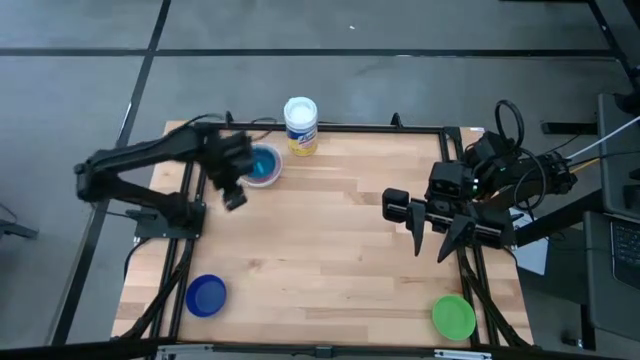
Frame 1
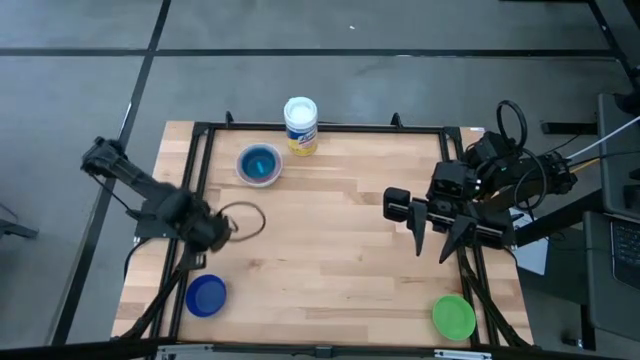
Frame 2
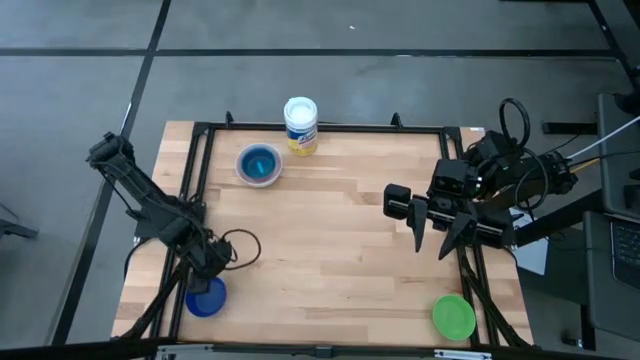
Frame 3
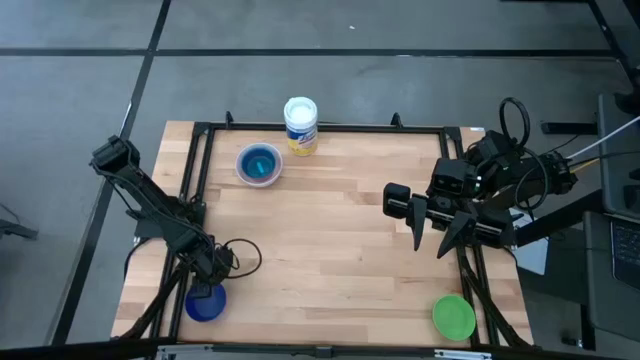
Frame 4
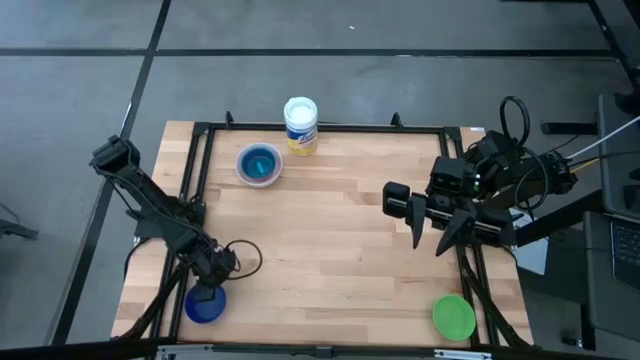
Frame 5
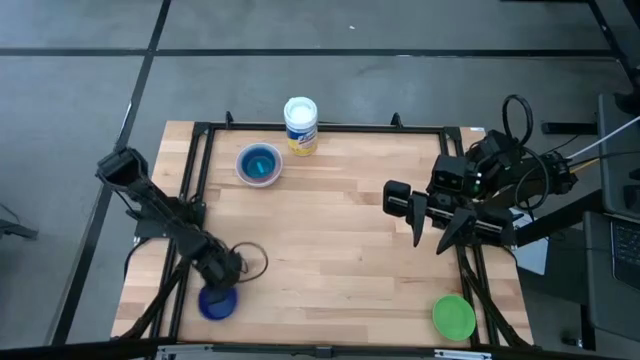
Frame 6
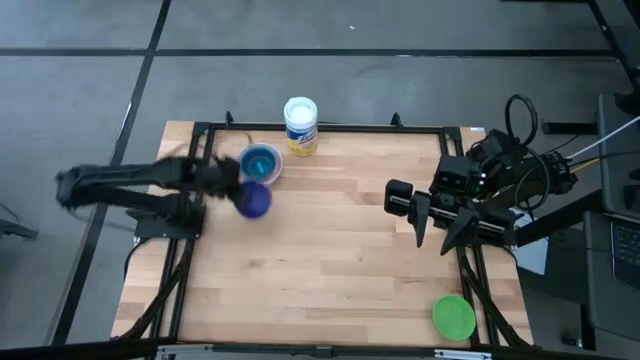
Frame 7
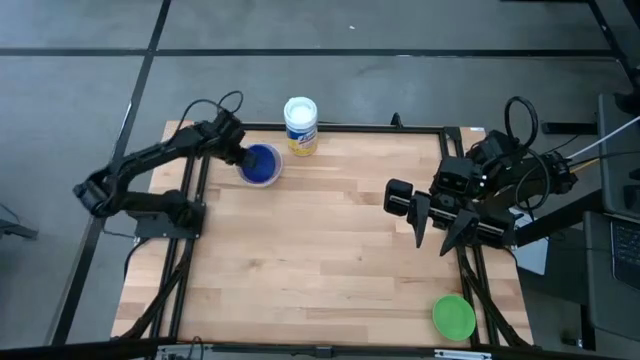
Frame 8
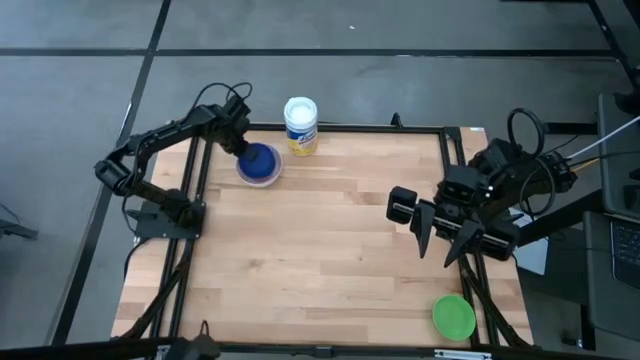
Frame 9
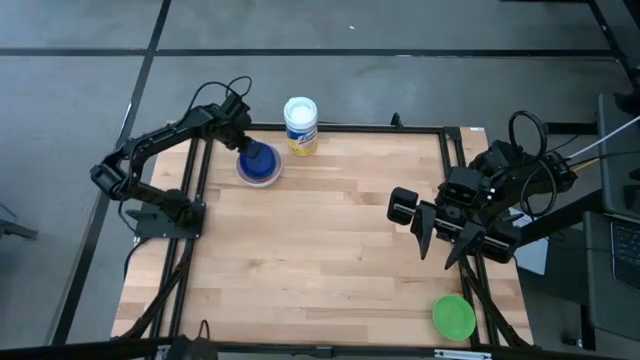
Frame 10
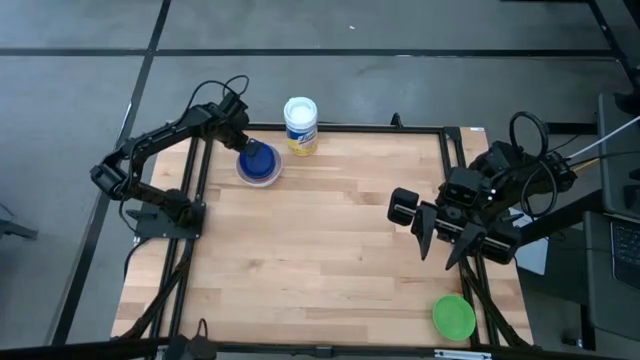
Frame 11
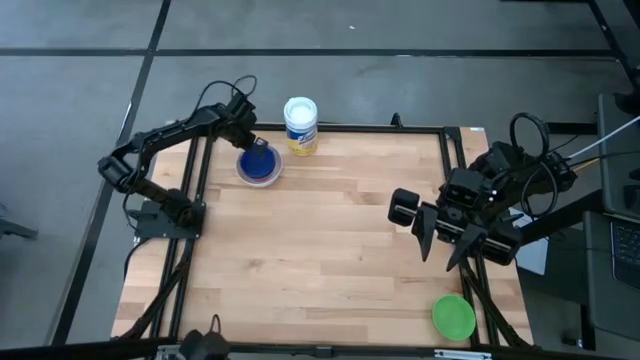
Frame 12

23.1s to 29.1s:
Stack the blue bowl on top of the light blue bowl

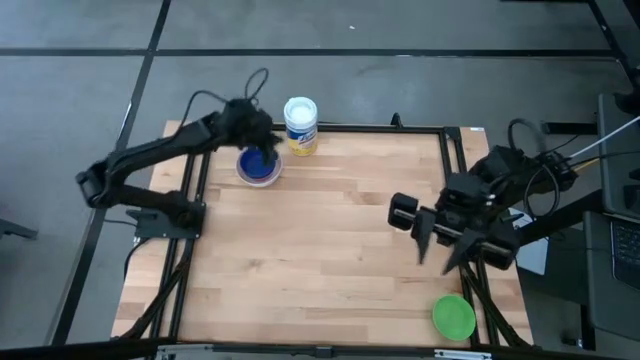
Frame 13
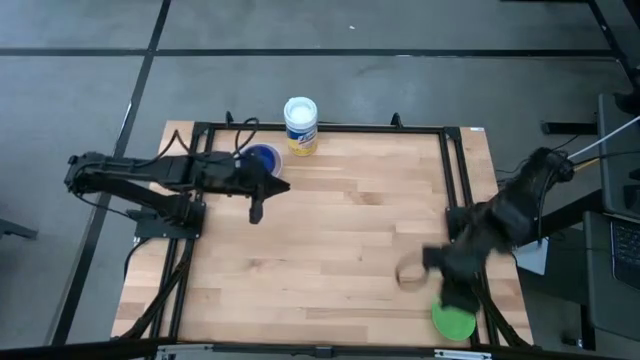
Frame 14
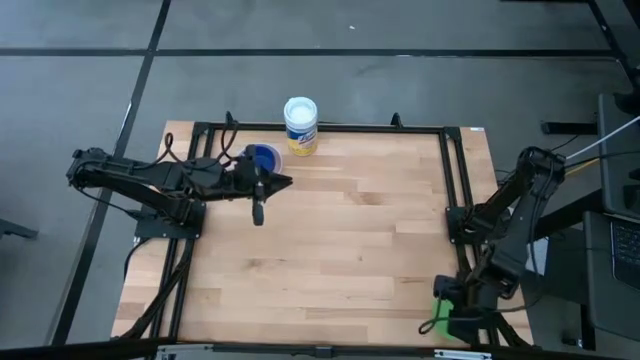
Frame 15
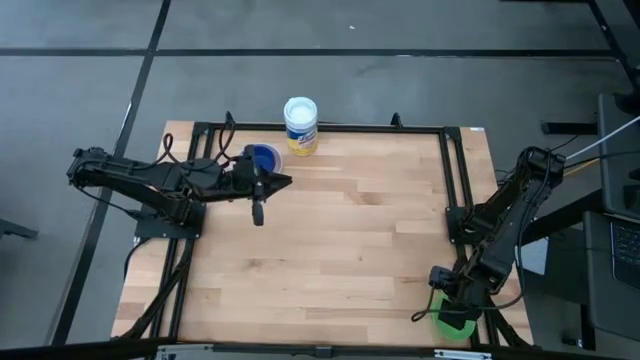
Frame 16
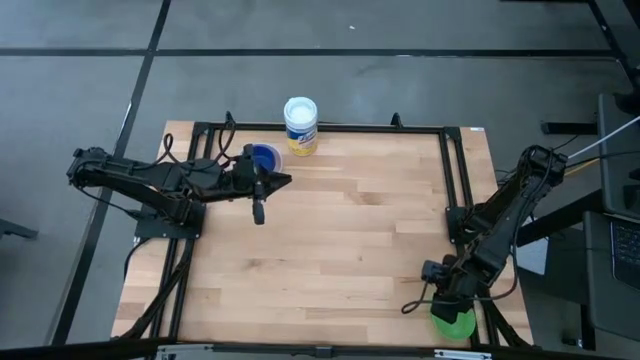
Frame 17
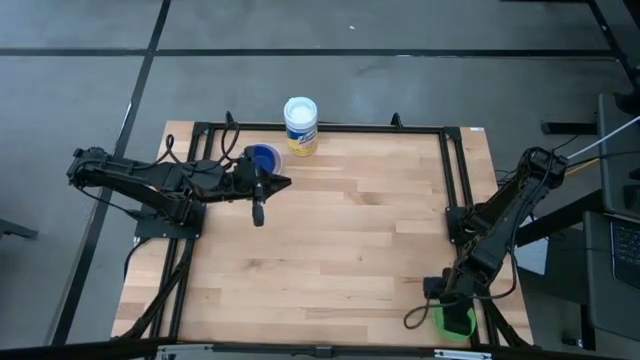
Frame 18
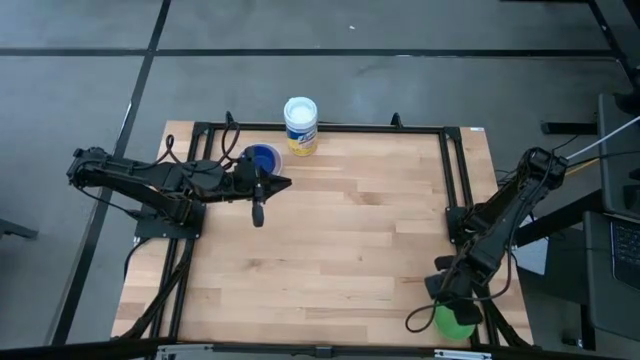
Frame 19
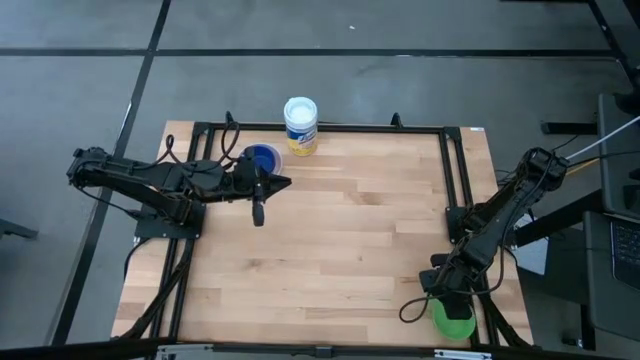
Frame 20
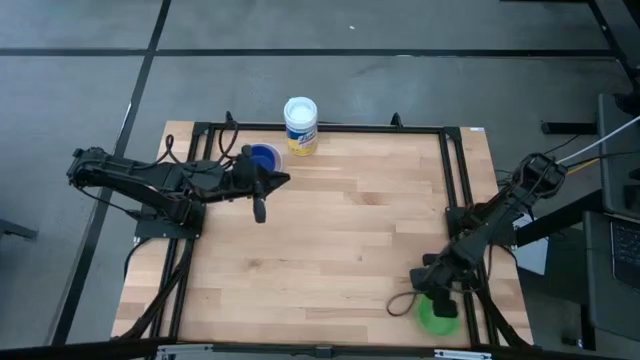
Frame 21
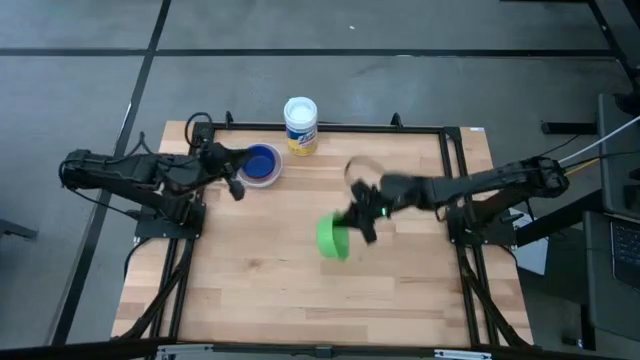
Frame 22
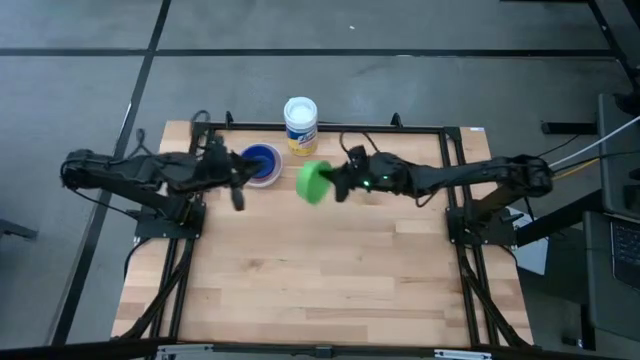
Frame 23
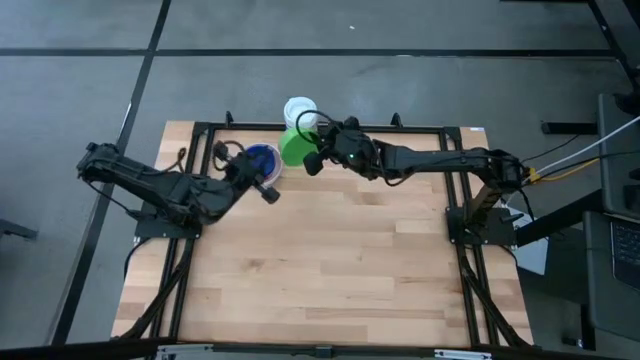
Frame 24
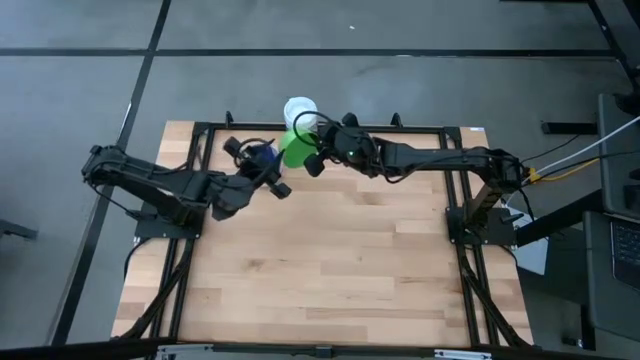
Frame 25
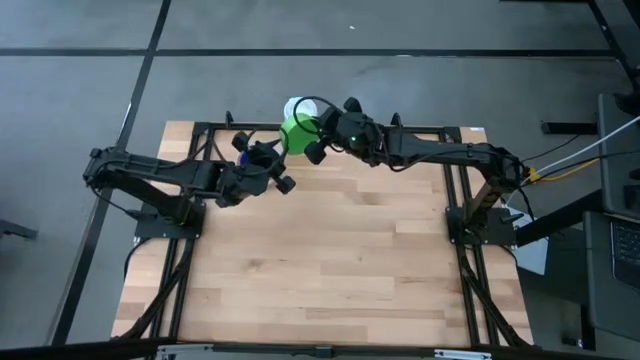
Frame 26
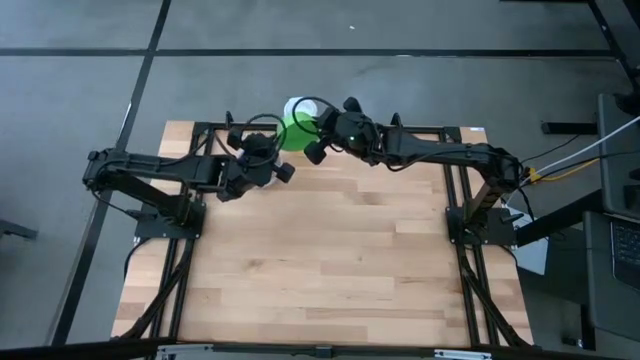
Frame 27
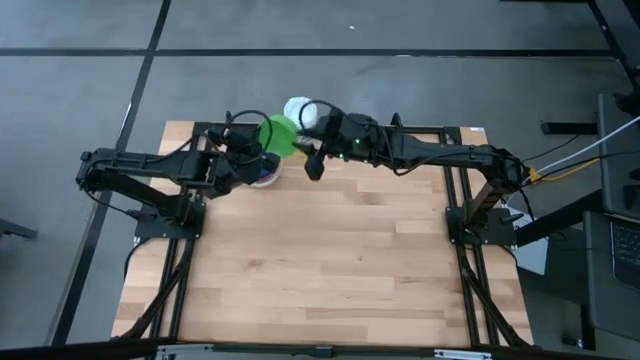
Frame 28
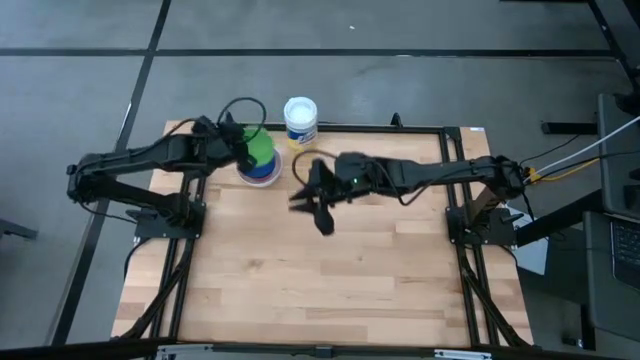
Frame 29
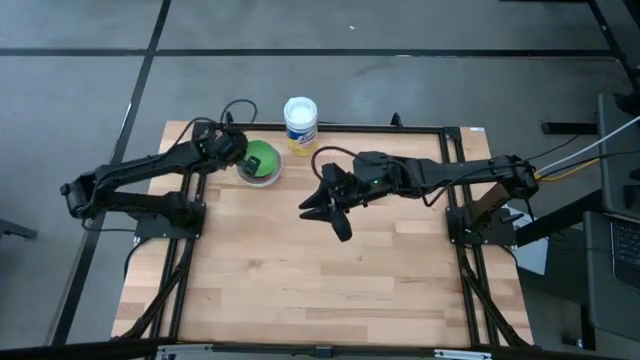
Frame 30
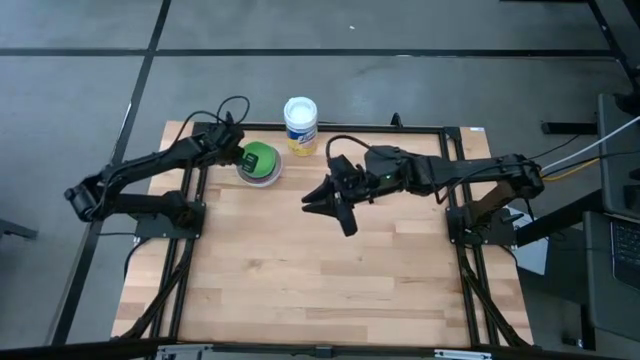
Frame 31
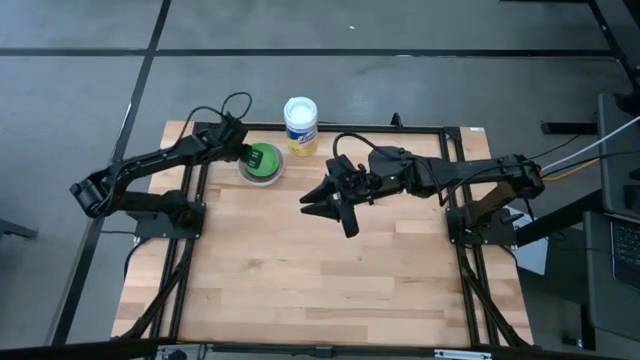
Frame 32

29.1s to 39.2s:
Stack the green bowl on top of the blue bowl

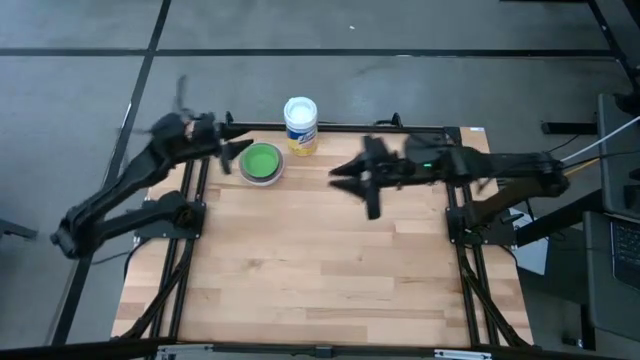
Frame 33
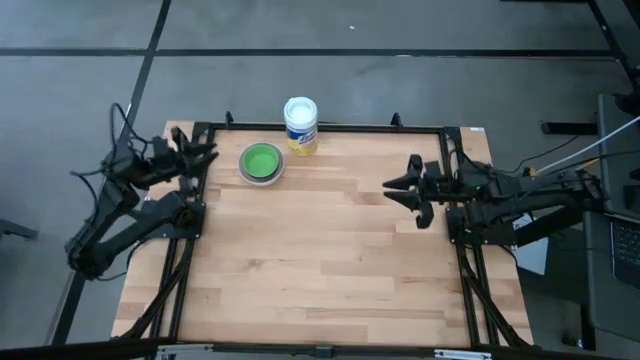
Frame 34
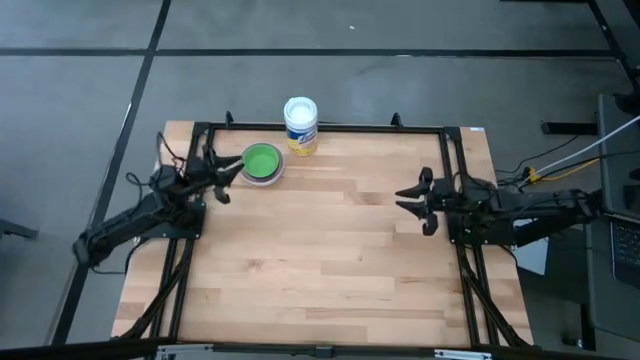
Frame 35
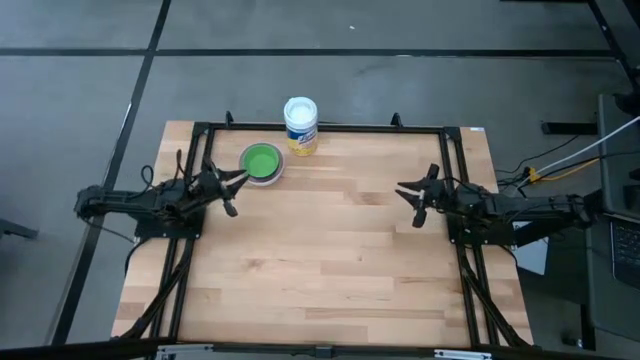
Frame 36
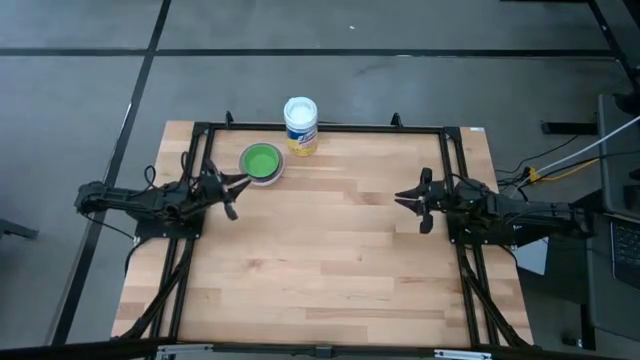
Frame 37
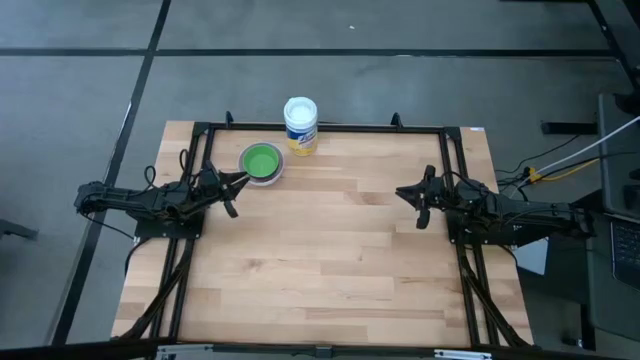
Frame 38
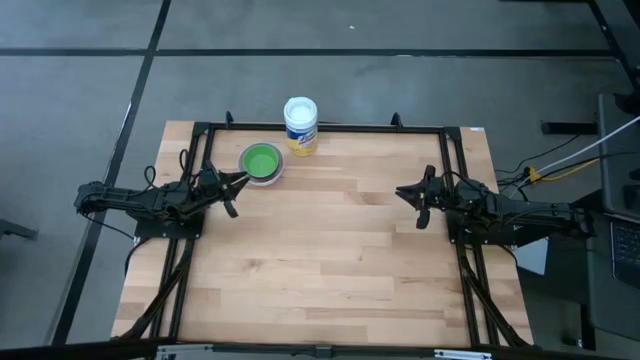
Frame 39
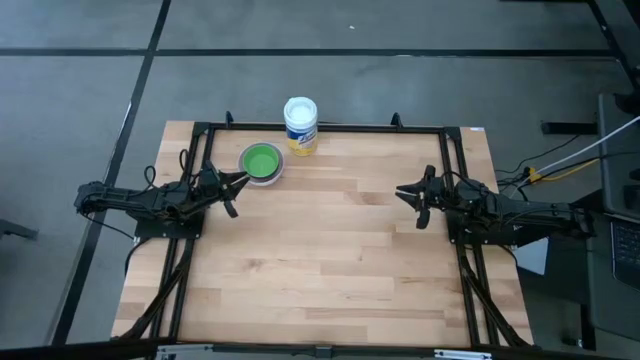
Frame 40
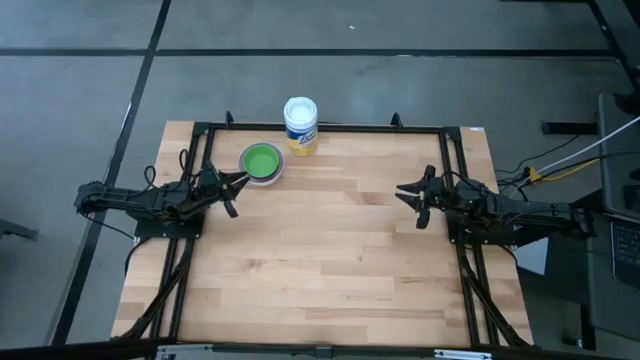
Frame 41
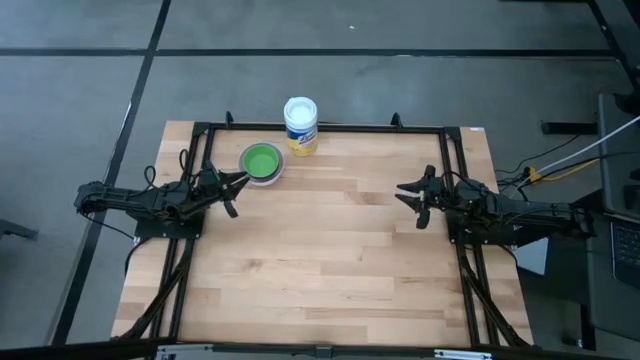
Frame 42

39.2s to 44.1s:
Return to Home Position
